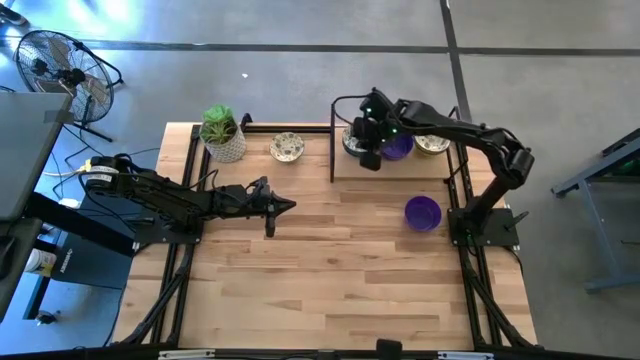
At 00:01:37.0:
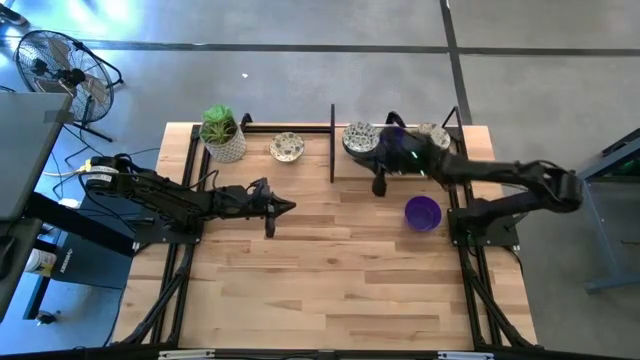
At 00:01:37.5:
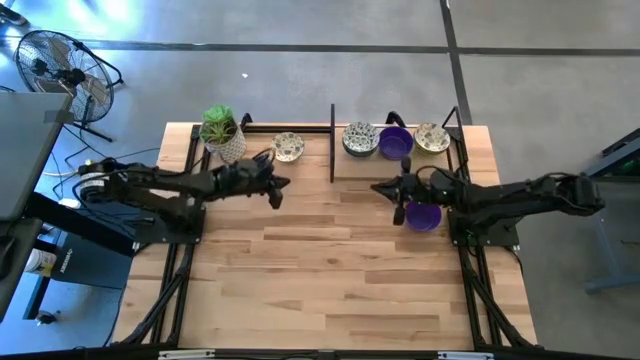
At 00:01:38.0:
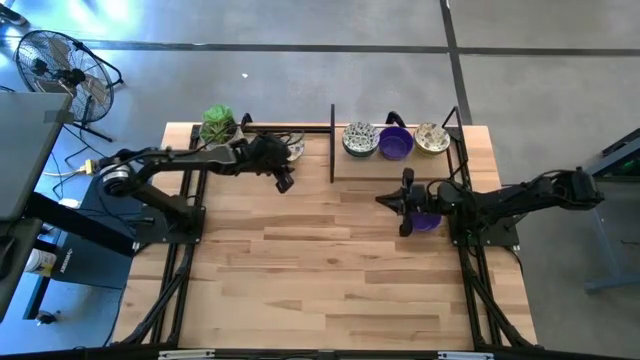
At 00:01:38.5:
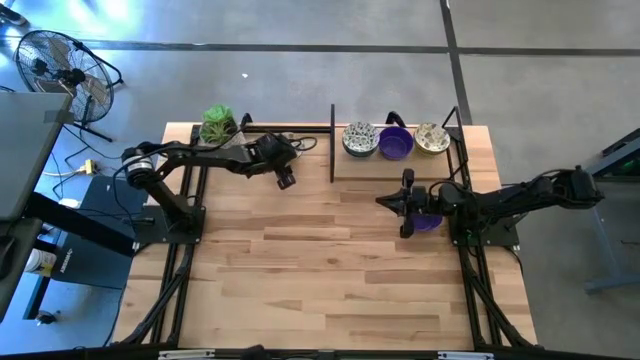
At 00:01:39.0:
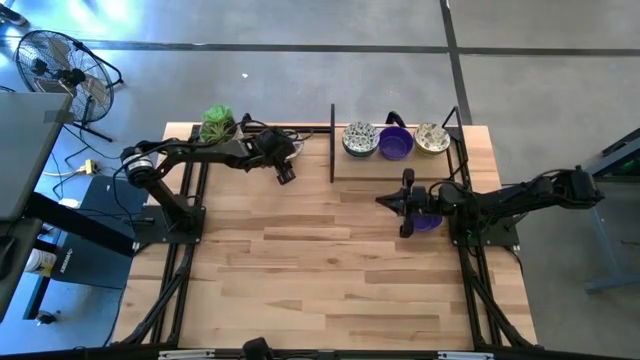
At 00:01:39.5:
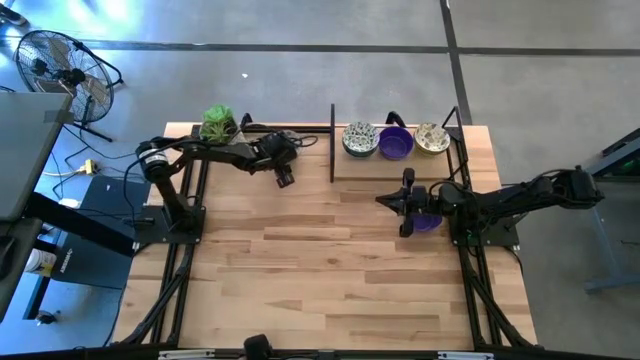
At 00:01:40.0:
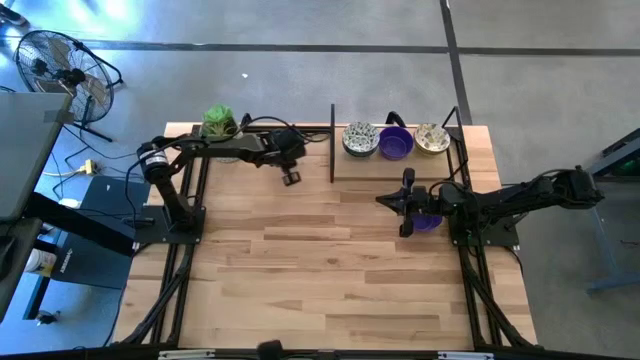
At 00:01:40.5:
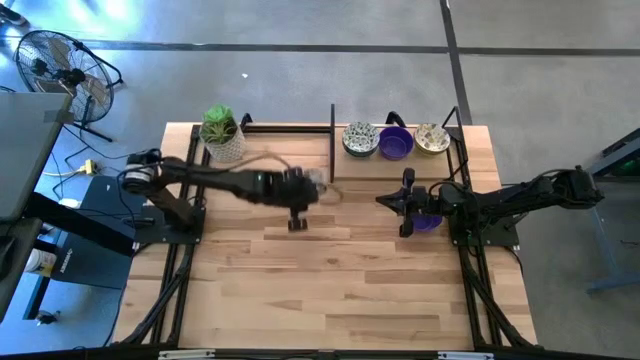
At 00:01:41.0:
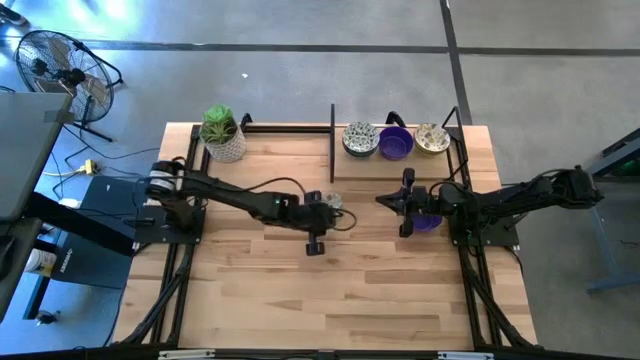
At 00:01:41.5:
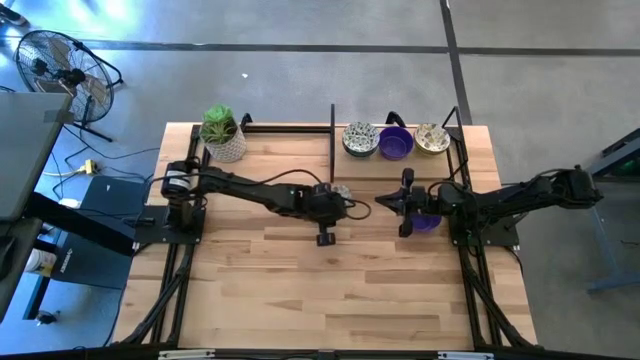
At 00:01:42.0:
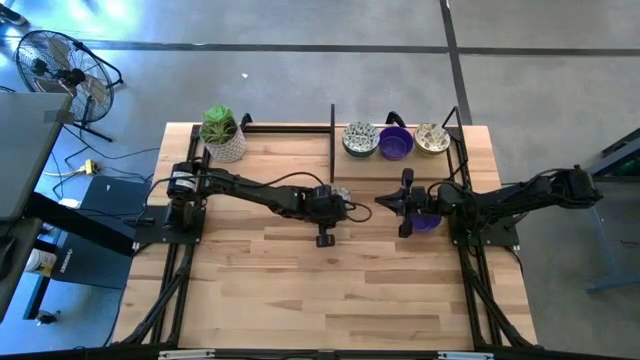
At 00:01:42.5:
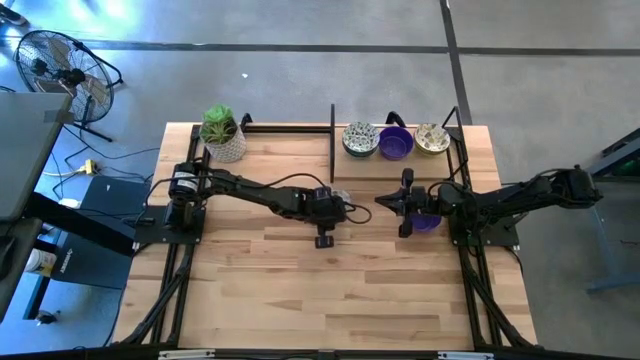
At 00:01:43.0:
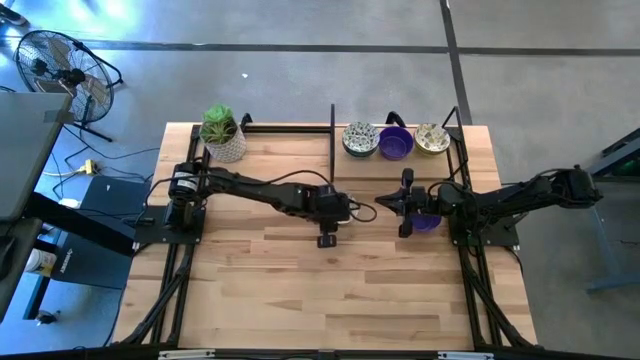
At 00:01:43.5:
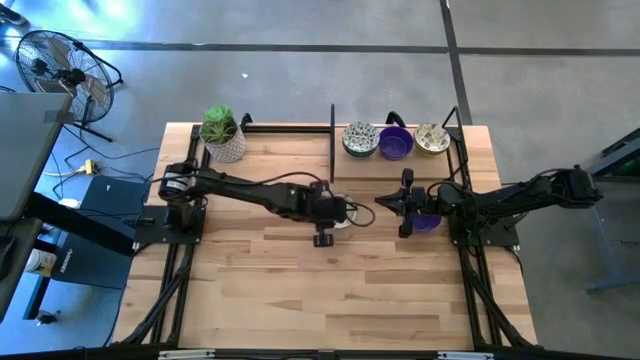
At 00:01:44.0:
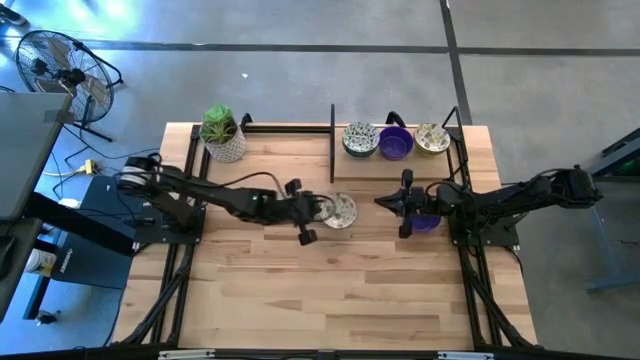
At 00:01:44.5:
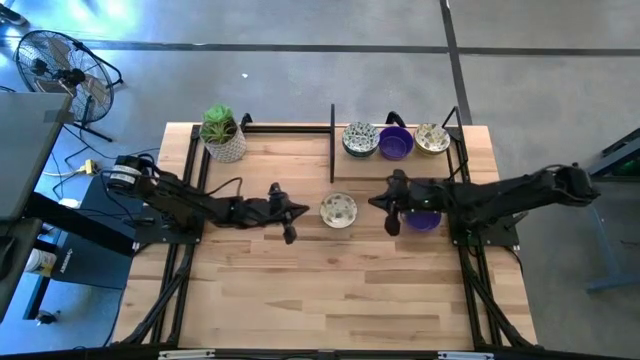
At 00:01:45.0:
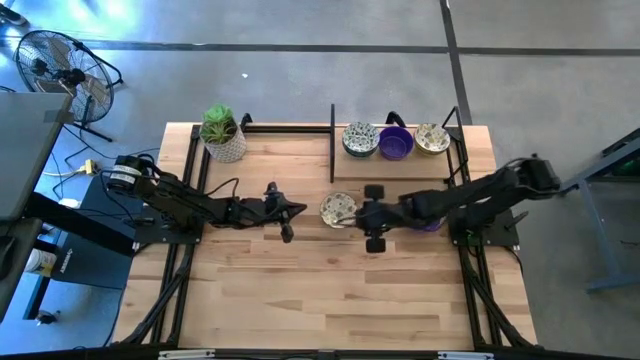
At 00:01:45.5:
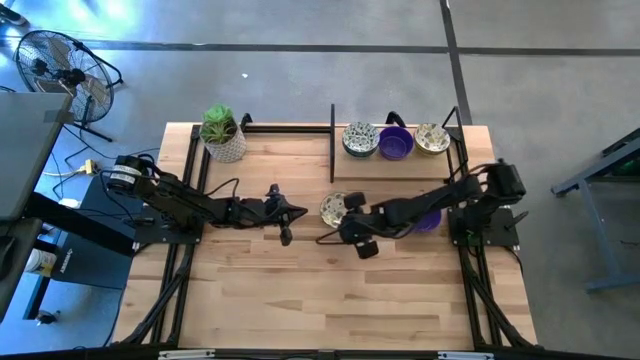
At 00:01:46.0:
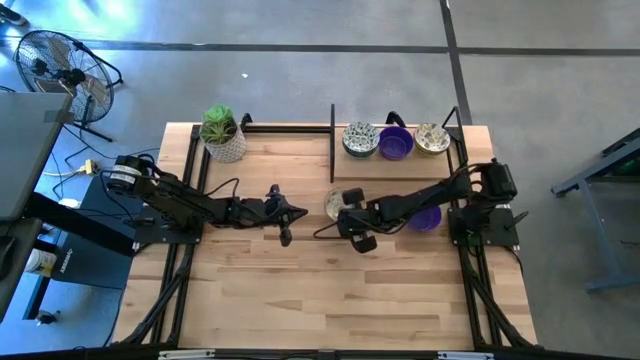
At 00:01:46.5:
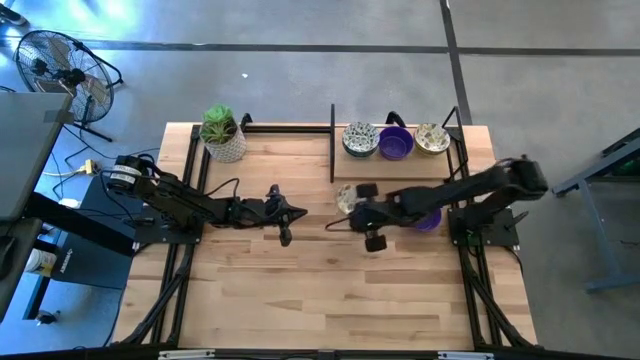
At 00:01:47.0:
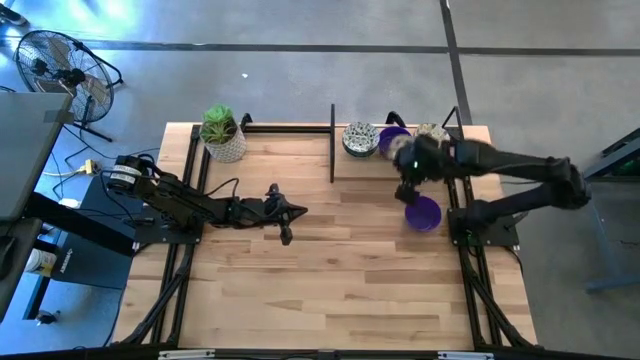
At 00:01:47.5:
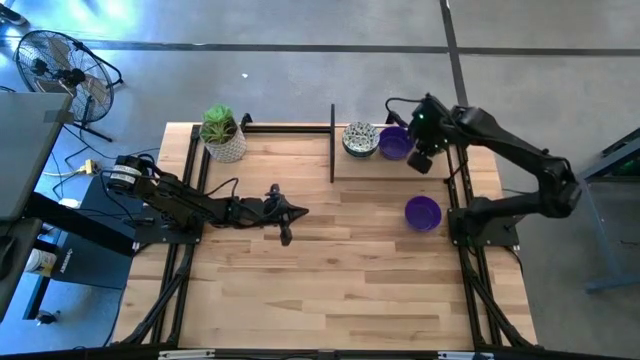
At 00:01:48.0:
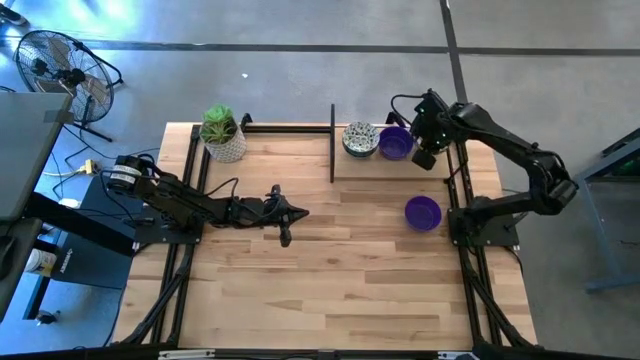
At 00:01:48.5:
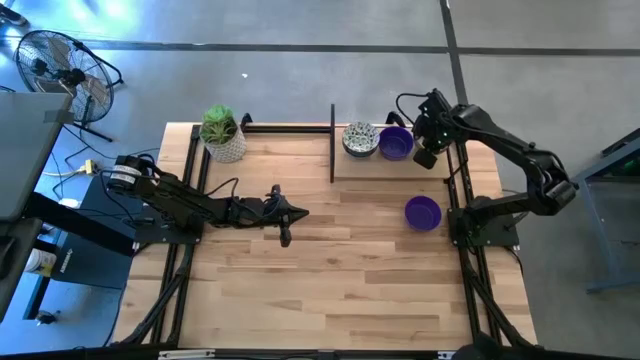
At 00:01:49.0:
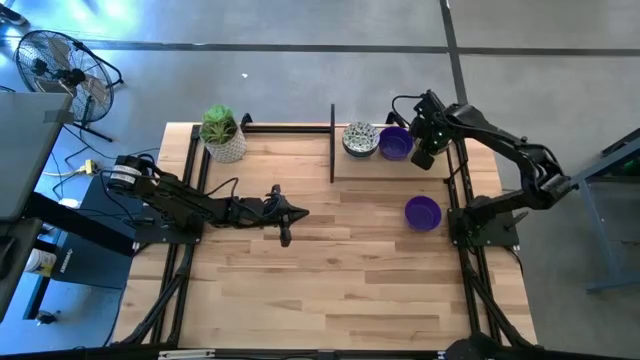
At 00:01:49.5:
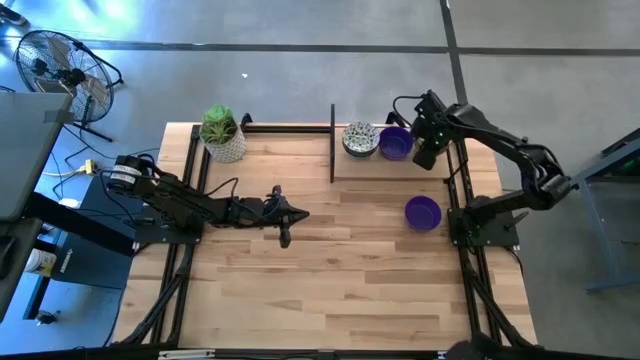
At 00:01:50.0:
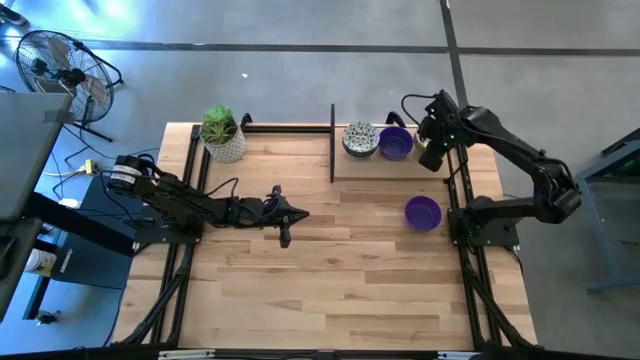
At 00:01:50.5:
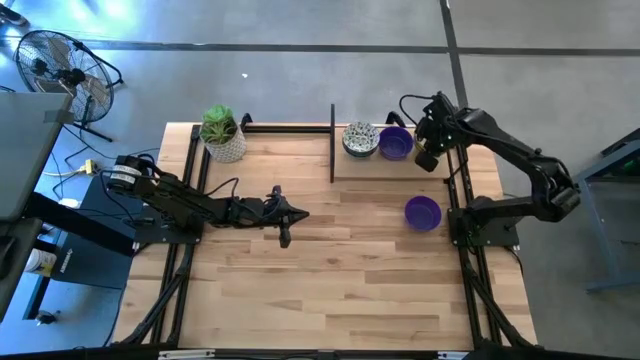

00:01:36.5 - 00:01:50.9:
Task: Pick & Place Mini bowls
Stack the yellow bowl on top of the yellow bowls on the shelf

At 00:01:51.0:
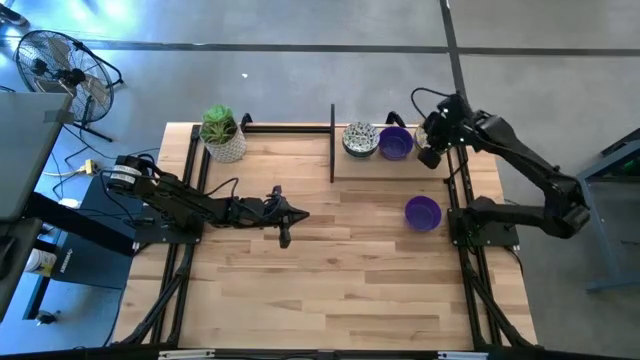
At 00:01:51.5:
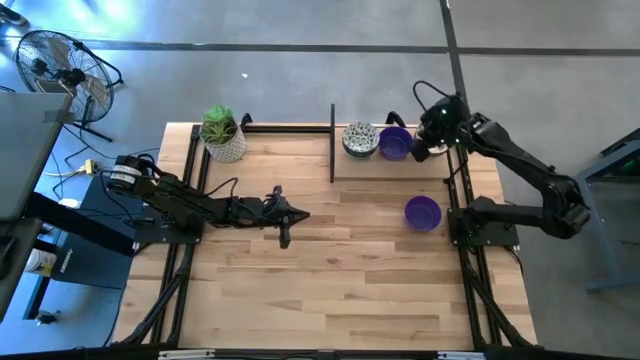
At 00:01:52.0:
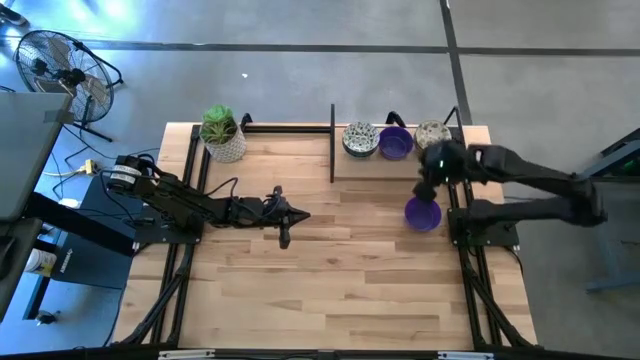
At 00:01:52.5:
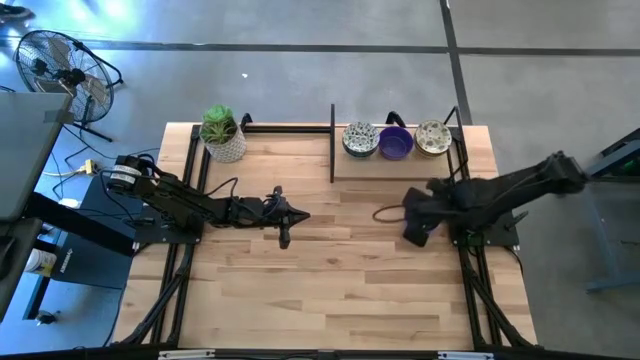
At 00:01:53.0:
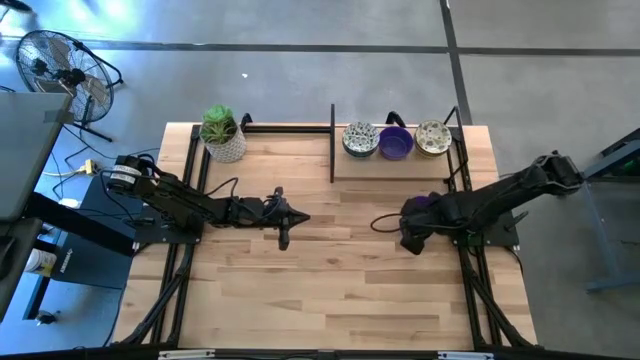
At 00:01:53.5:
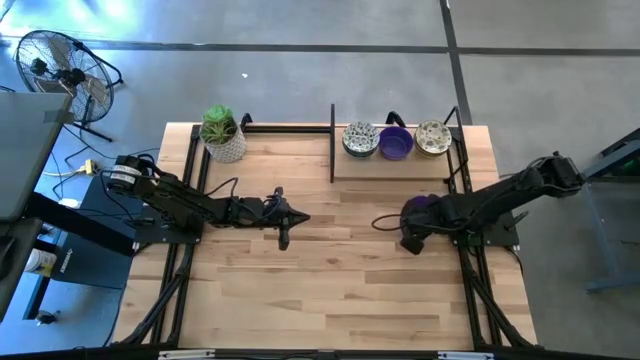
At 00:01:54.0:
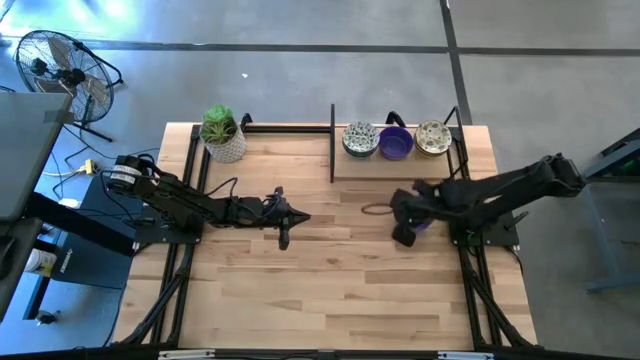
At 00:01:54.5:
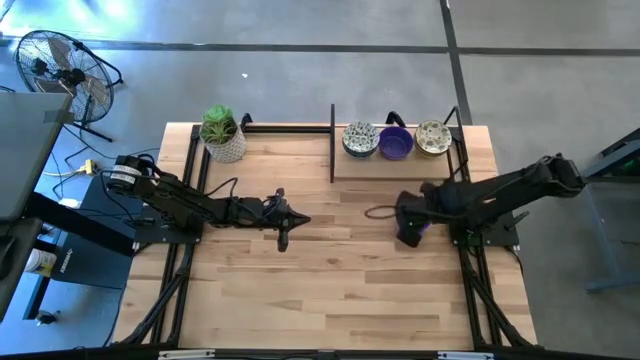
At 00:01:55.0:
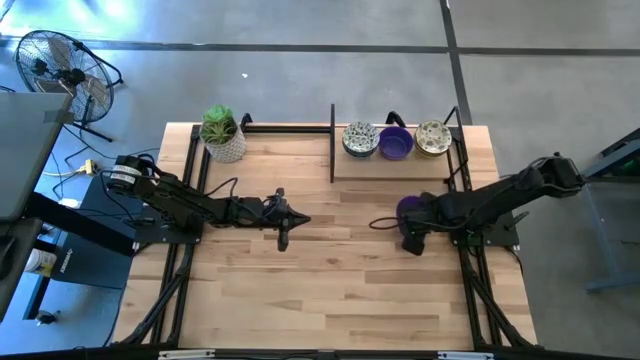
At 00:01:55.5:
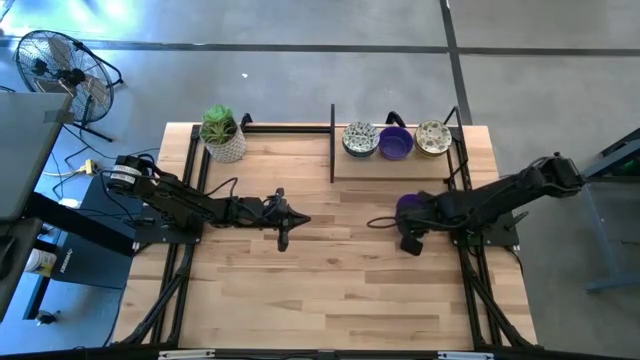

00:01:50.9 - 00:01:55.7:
Stack the blue bowl on top of the blue bowls on the shelf

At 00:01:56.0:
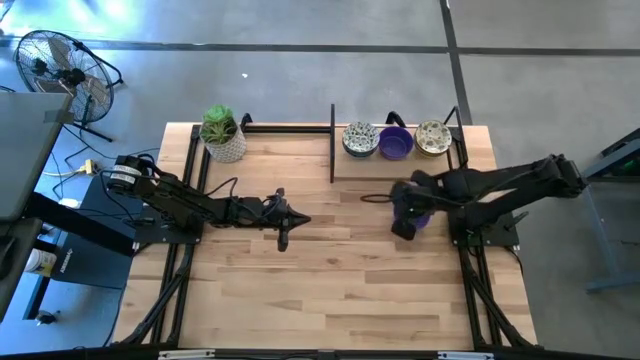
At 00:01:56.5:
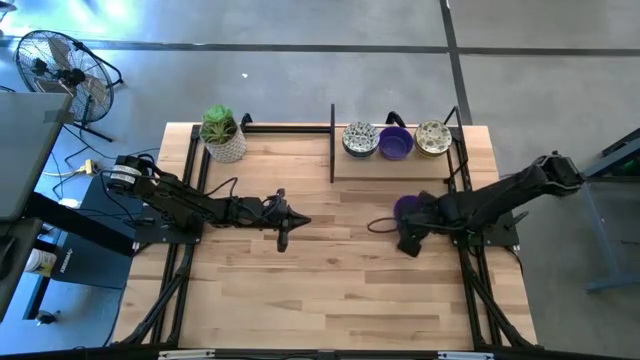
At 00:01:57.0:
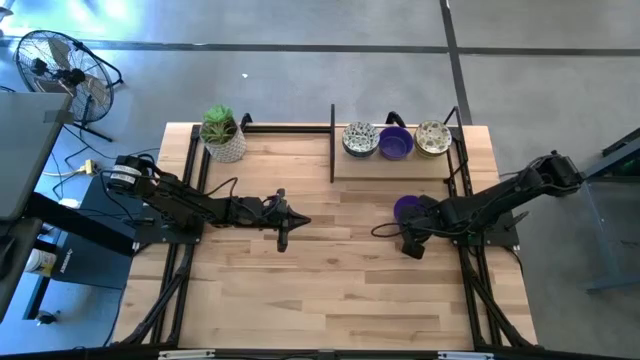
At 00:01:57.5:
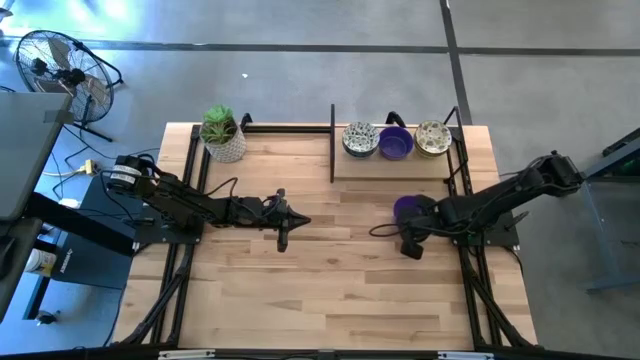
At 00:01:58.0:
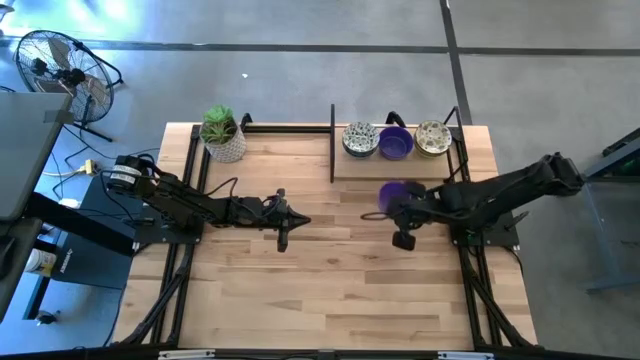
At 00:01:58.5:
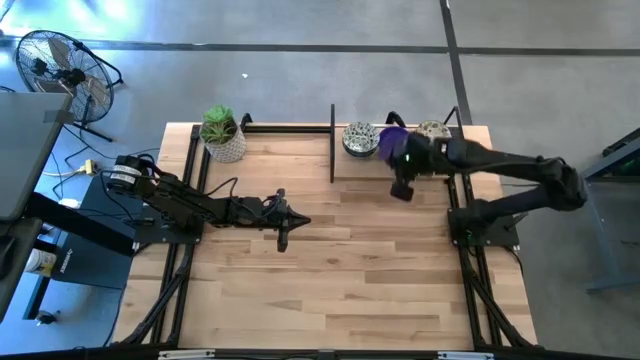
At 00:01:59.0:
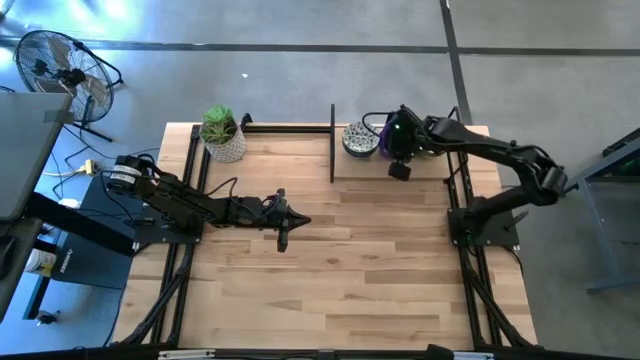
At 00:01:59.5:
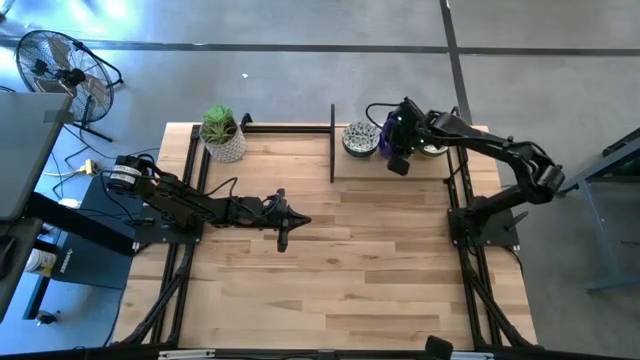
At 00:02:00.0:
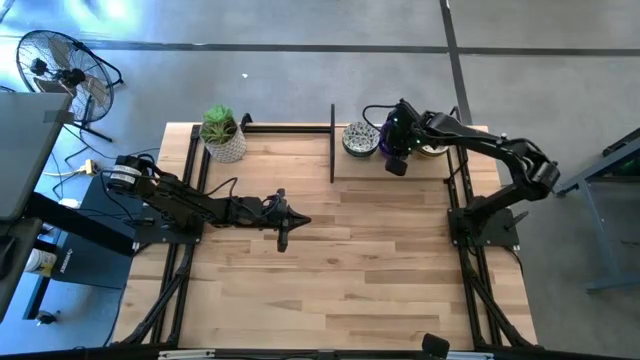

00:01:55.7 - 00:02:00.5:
Stack the blue bowl on top of the blue bowls on the shelf
